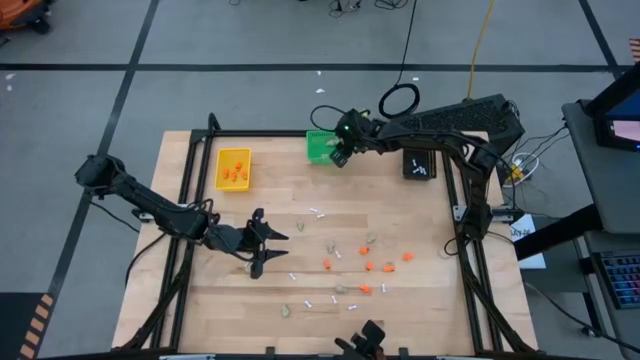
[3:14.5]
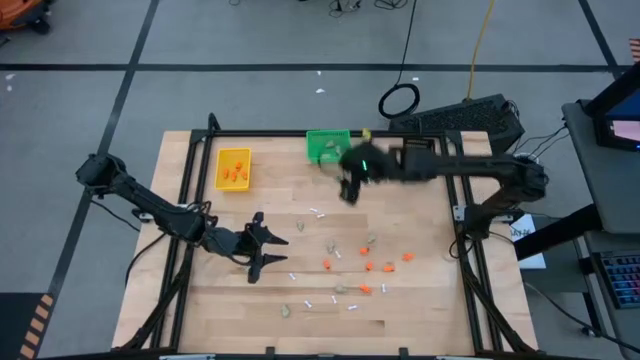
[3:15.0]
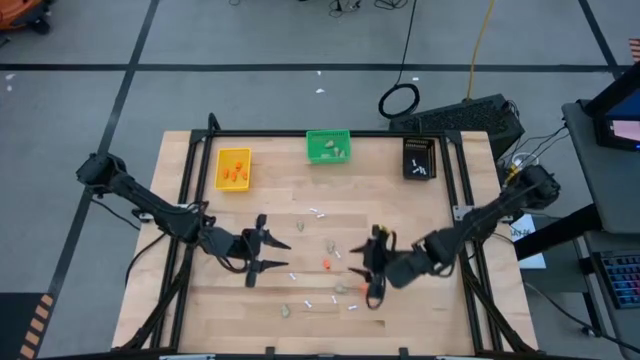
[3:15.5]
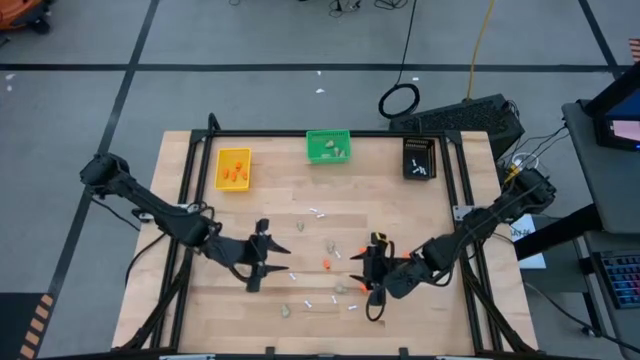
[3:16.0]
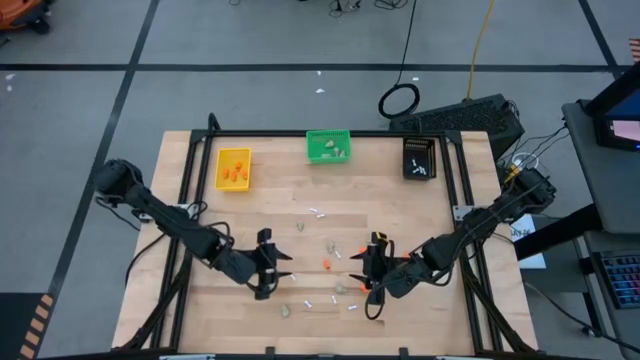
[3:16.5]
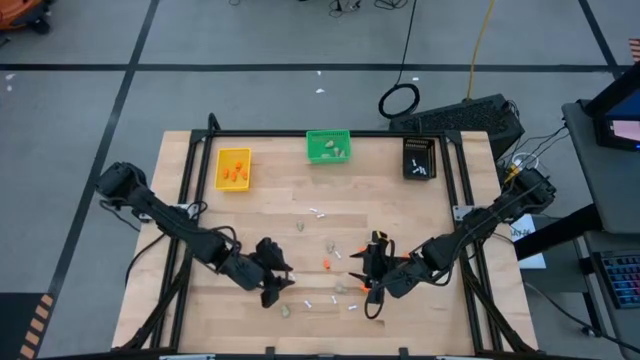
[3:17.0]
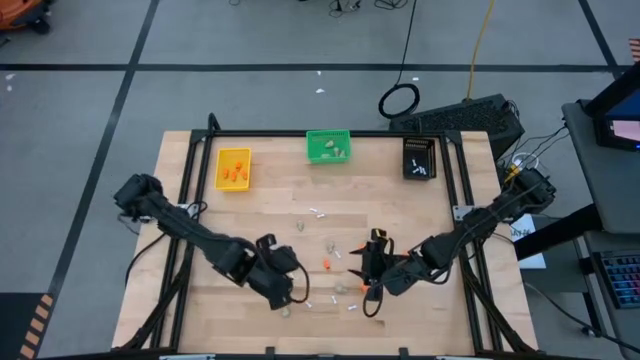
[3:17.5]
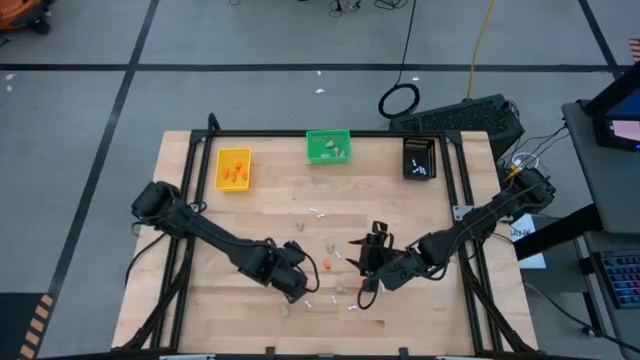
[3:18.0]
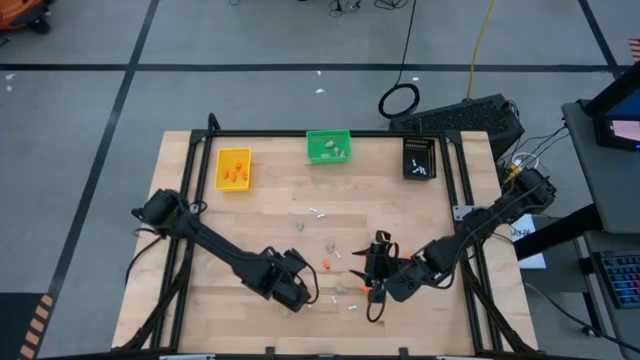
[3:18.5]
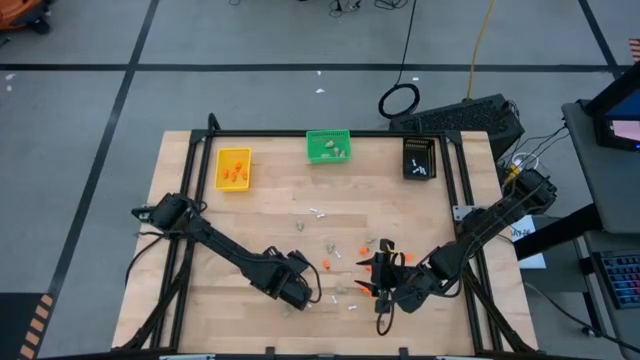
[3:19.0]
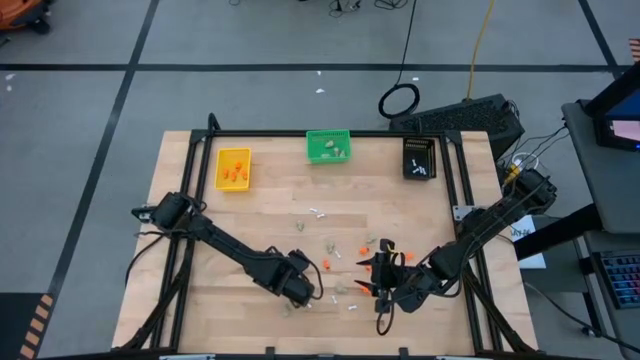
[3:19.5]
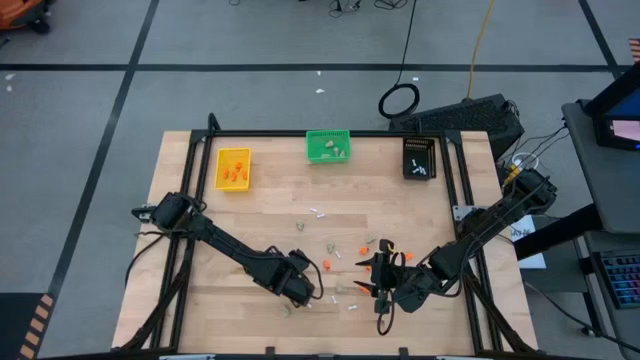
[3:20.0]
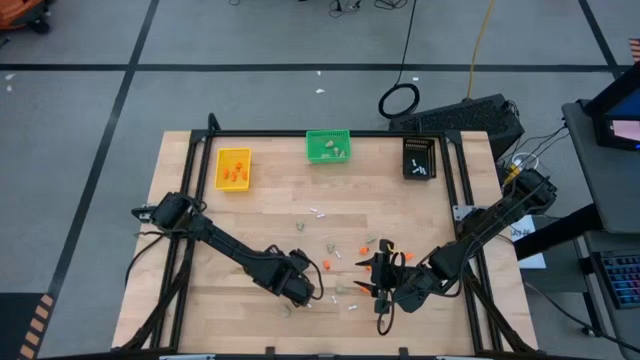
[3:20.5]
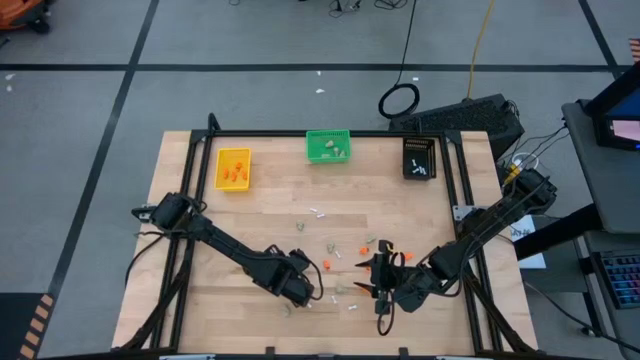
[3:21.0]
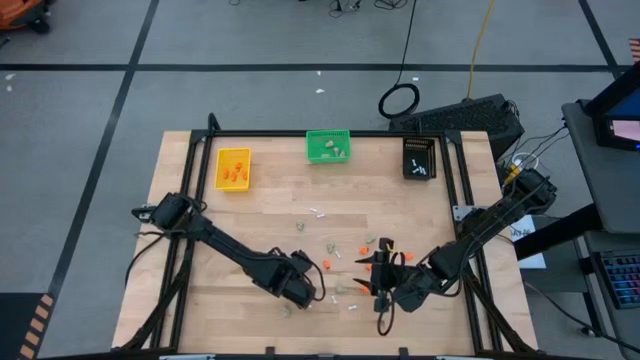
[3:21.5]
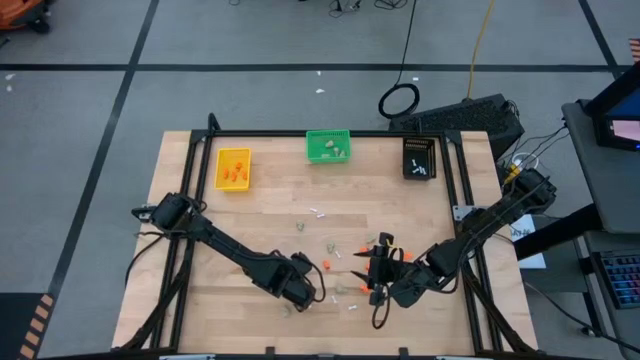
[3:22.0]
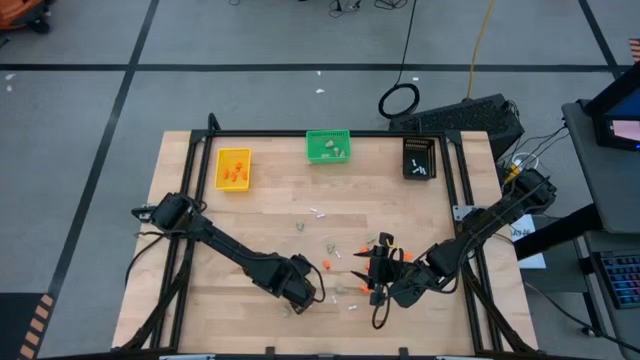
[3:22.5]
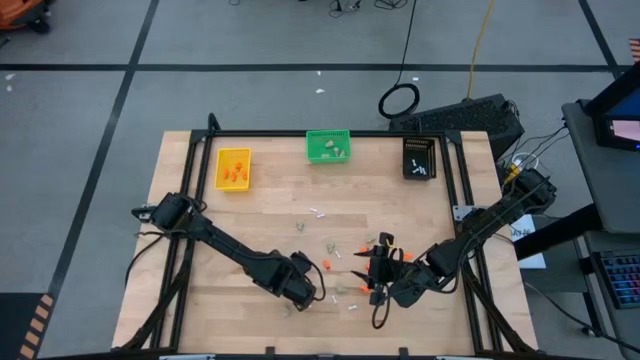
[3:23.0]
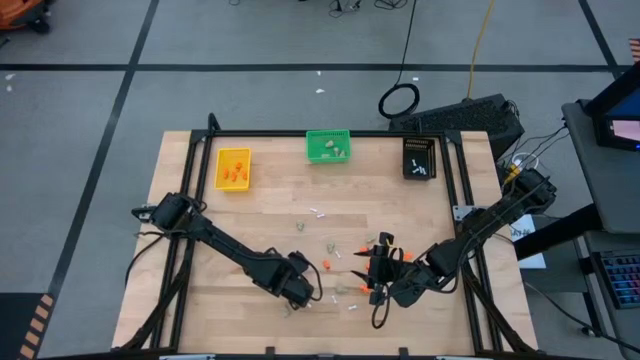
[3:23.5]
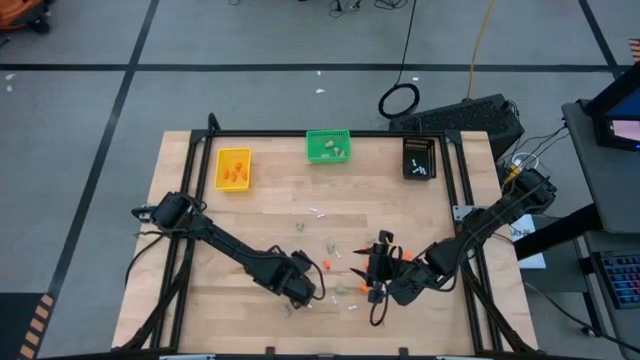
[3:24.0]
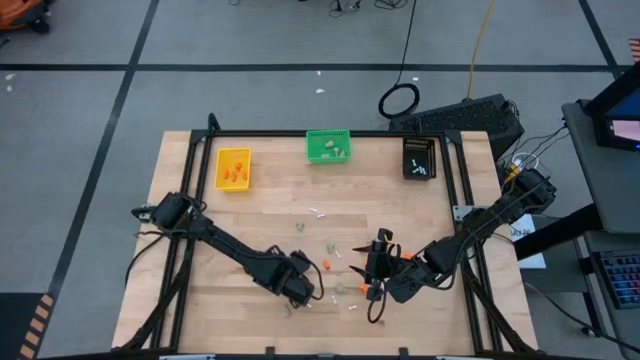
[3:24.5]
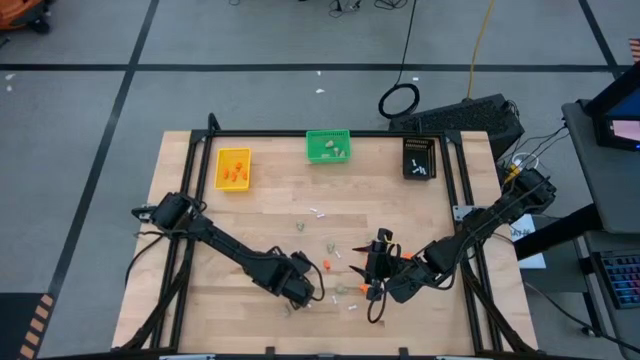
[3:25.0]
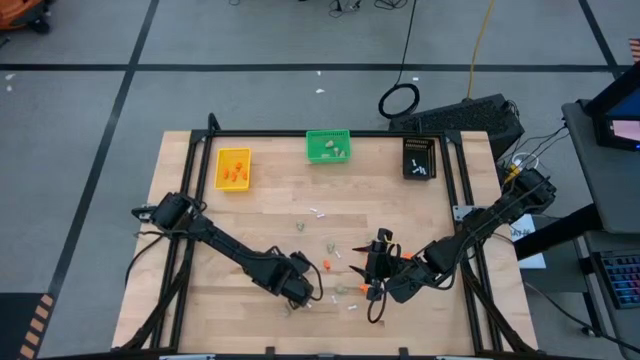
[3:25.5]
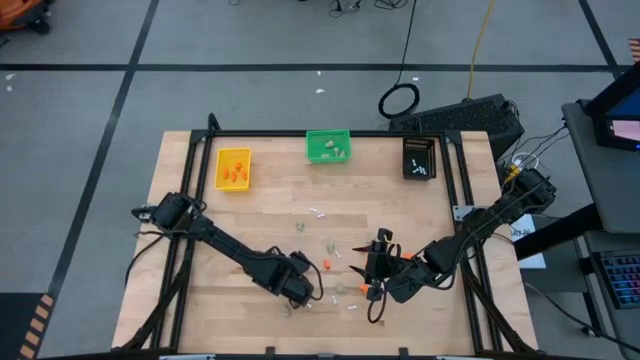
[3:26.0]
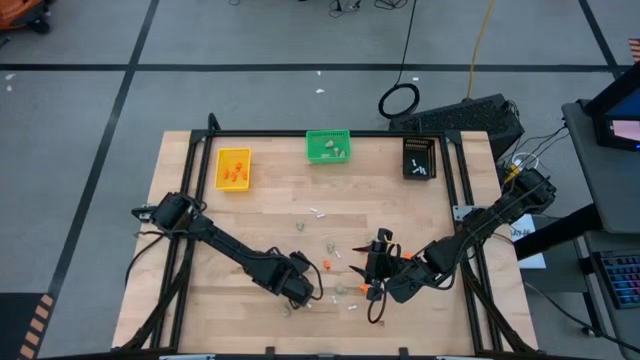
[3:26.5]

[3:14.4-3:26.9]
Task: Sort Halloween decoration
Put the white bone toy into the black bin

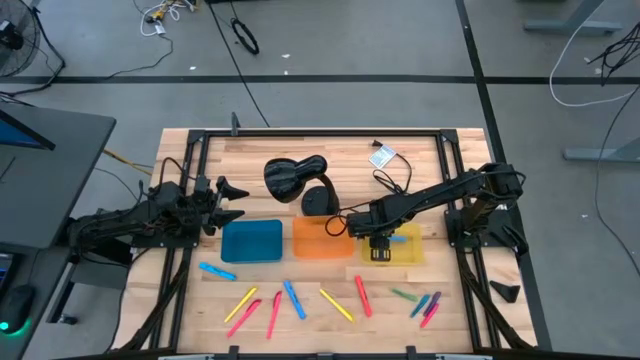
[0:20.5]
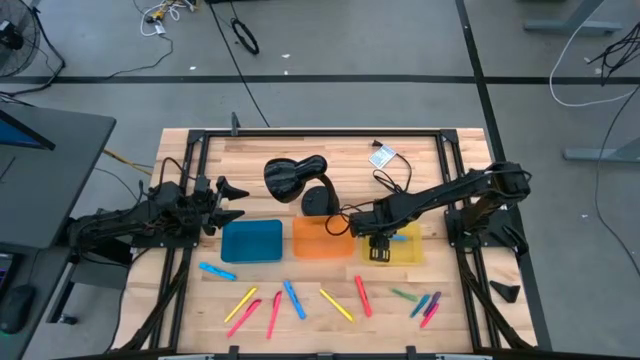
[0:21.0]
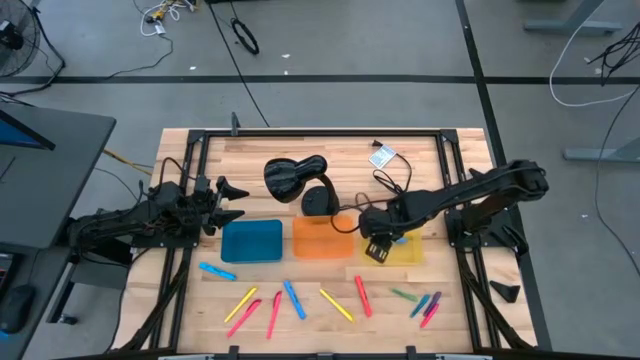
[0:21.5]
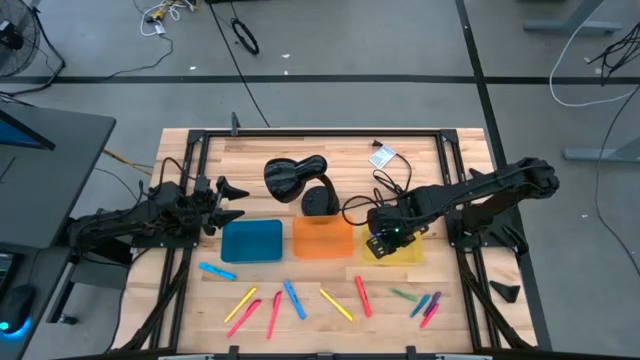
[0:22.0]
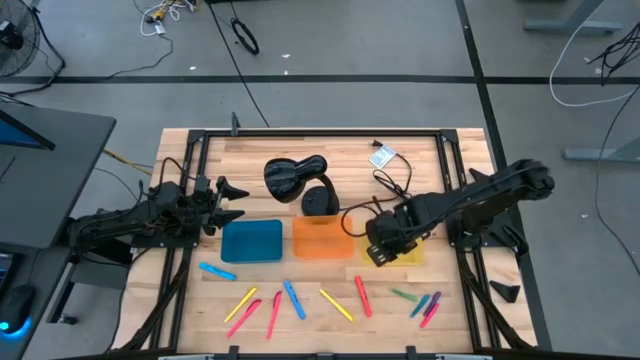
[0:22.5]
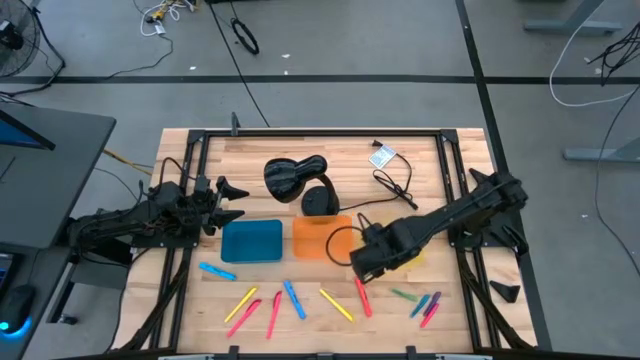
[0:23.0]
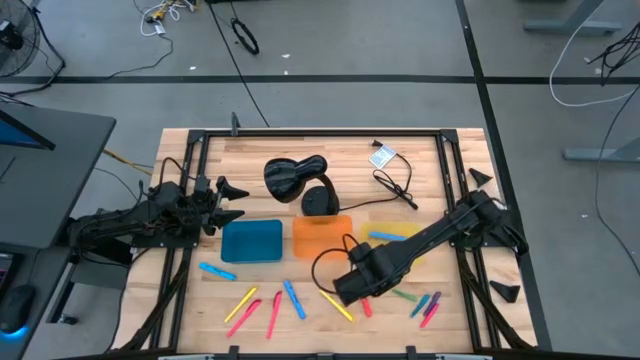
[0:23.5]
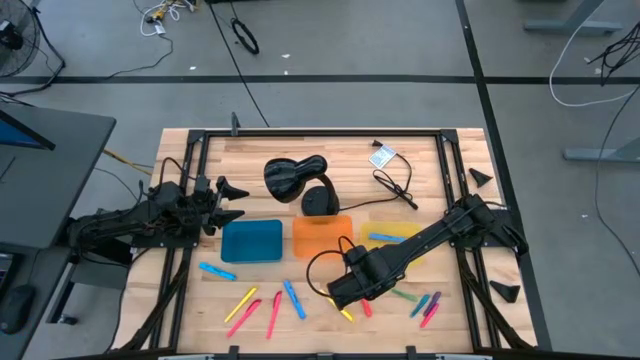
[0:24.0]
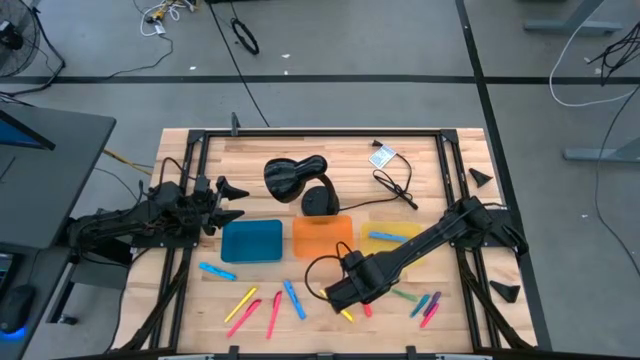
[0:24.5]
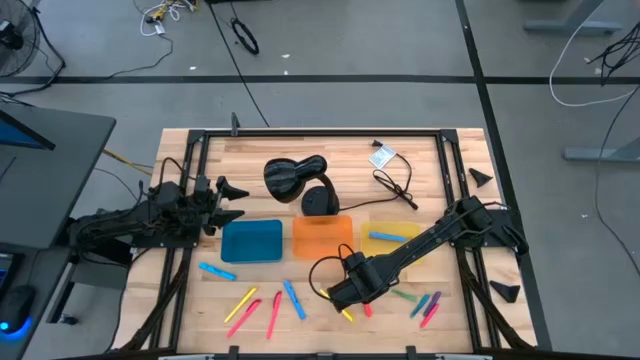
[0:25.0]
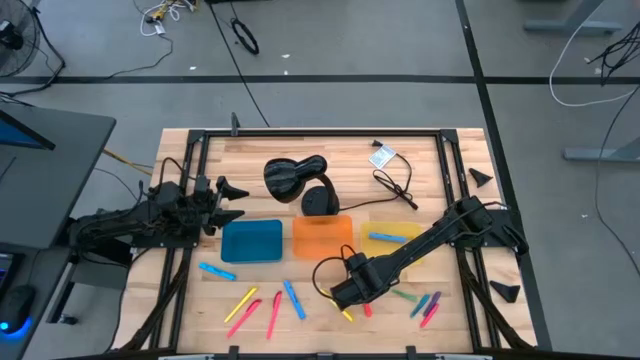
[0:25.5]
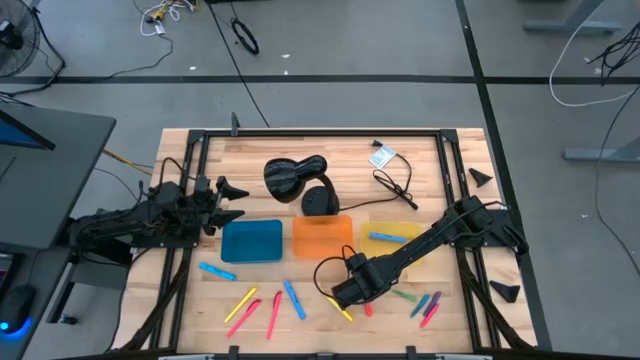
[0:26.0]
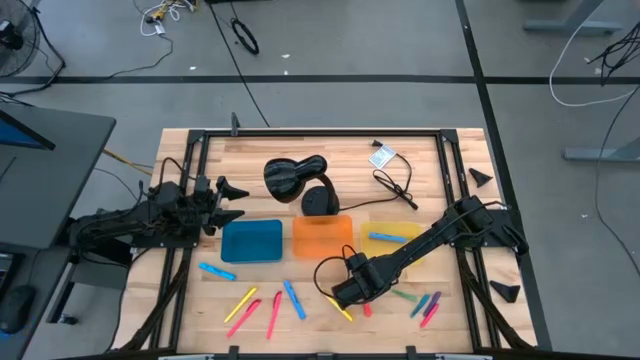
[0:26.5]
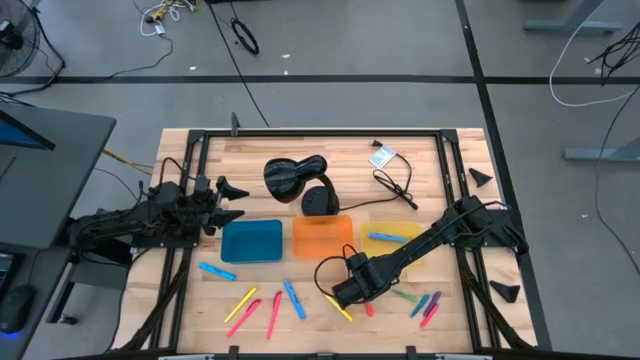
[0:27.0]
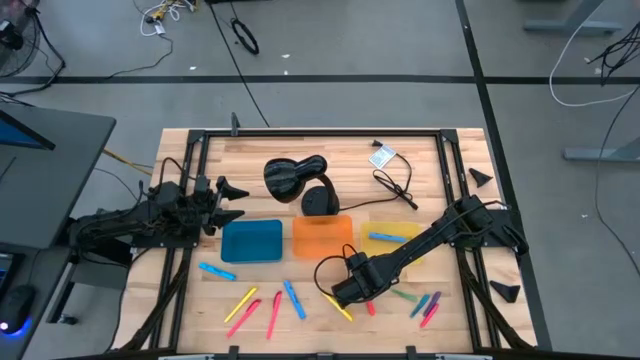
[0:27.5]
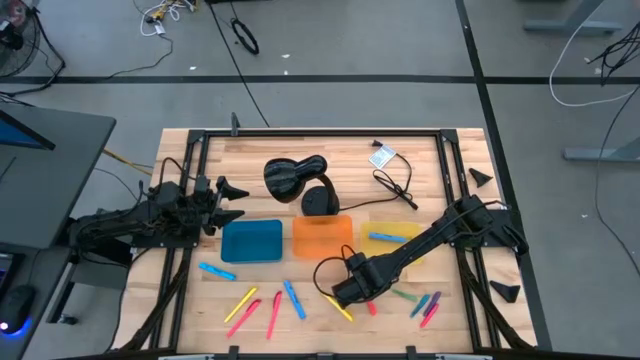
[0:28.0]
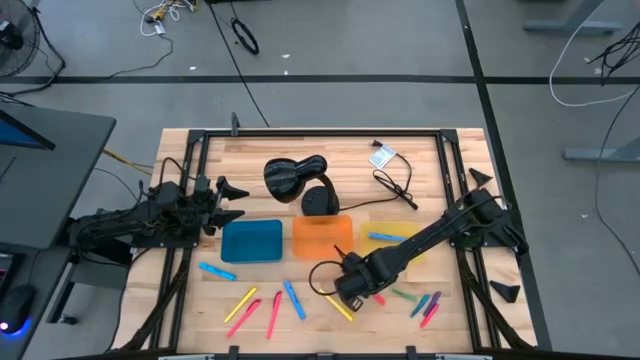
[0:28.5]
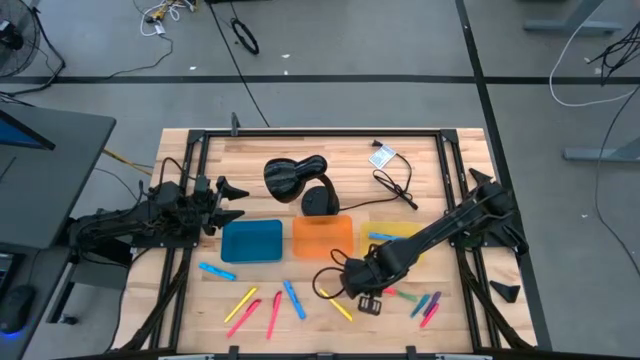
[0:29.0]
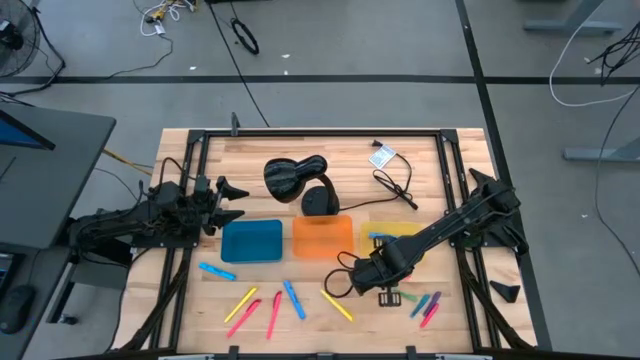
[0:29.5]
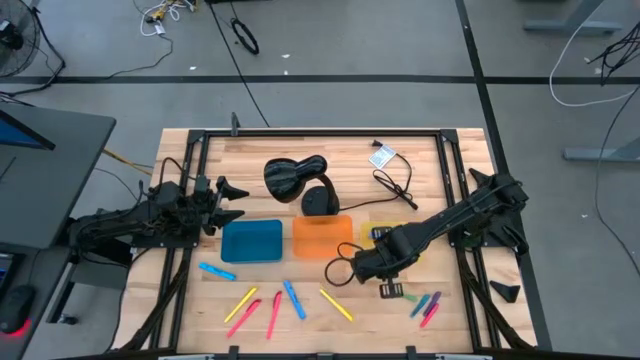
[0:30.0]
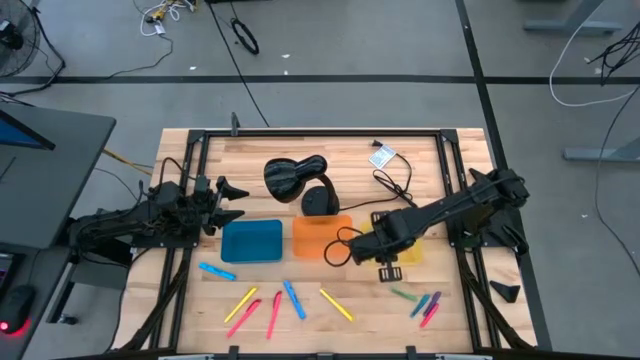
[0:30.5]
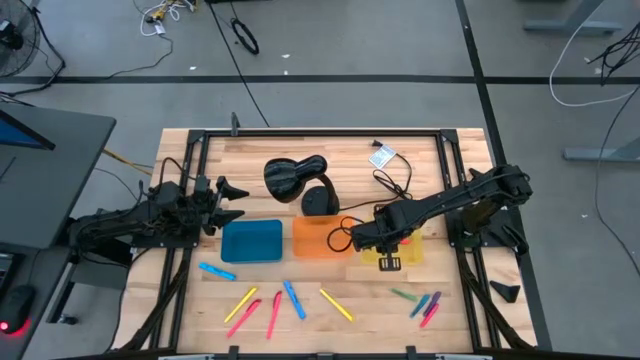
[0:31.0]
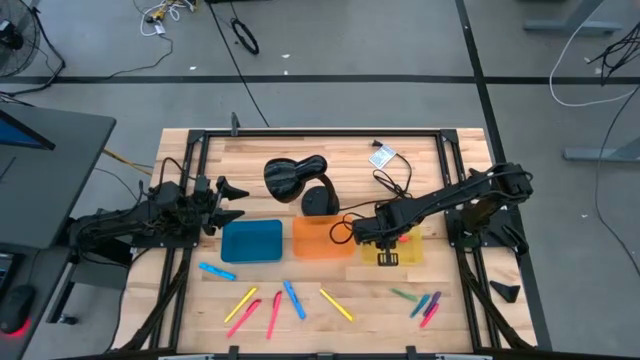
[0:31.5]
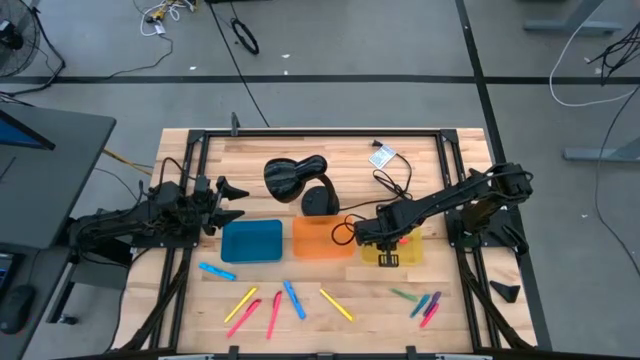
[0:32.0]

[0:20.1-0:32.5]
Task: Pick & Place Markers
Put the orange highlighter pen into the yellow bin
